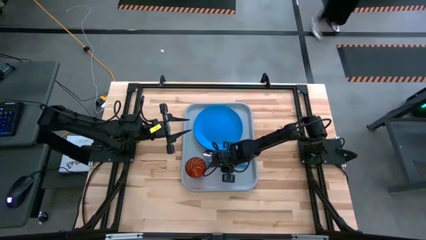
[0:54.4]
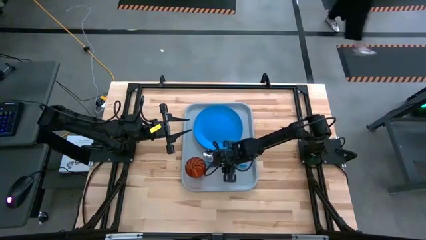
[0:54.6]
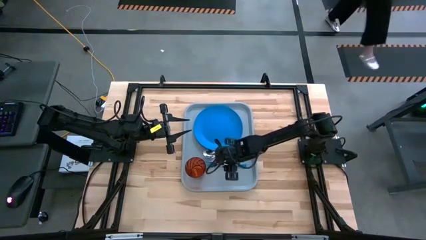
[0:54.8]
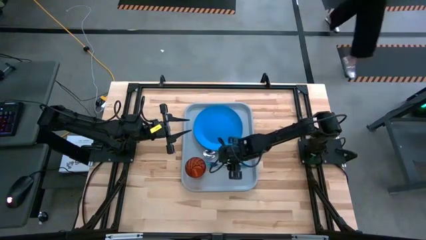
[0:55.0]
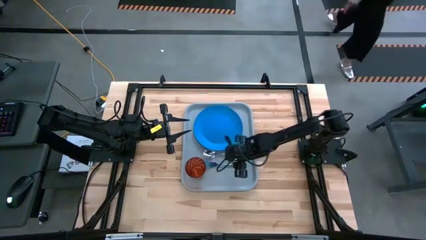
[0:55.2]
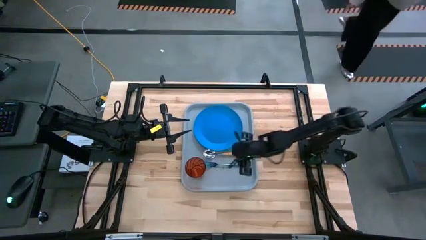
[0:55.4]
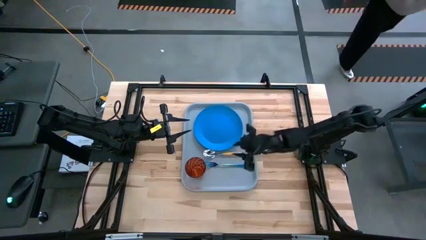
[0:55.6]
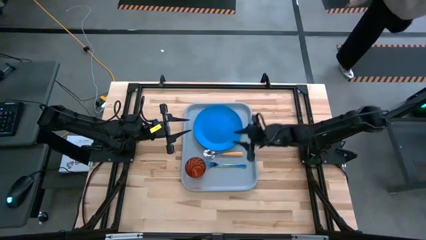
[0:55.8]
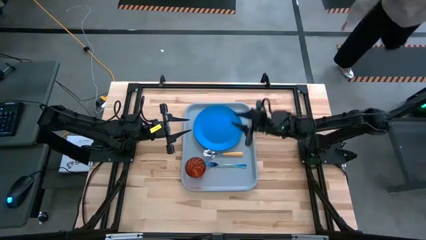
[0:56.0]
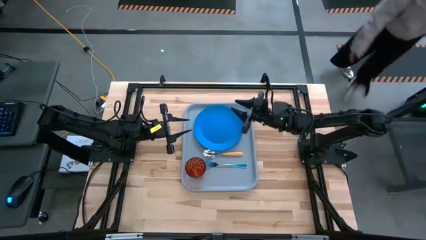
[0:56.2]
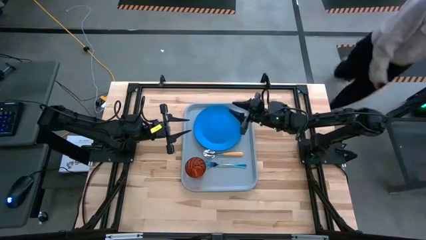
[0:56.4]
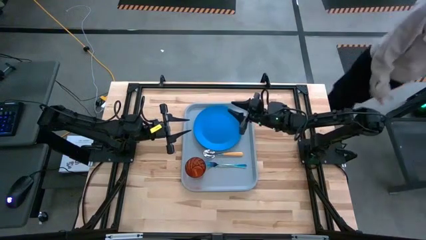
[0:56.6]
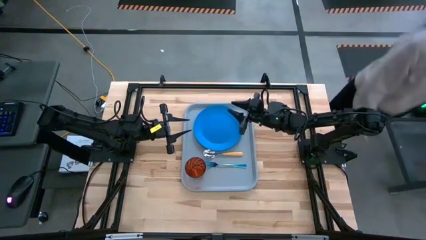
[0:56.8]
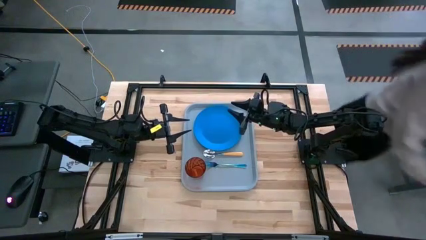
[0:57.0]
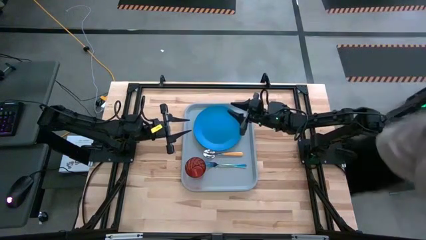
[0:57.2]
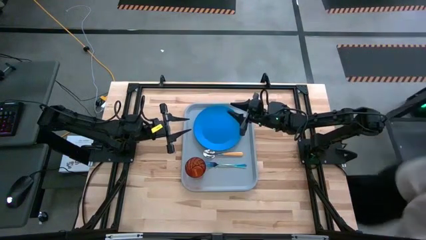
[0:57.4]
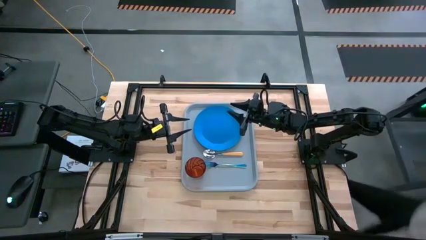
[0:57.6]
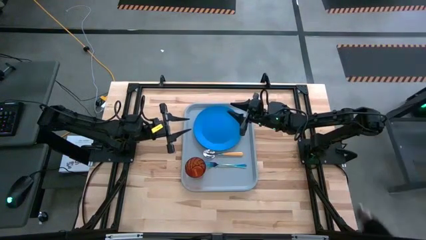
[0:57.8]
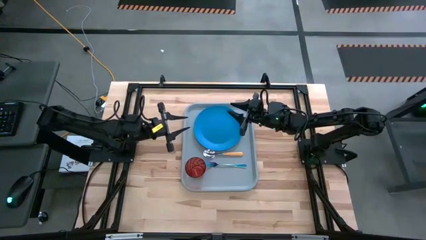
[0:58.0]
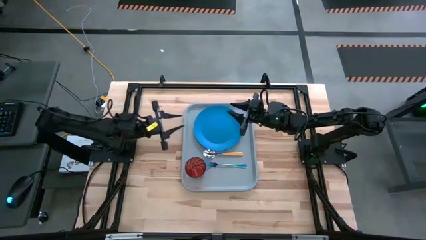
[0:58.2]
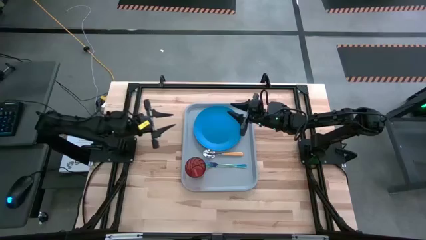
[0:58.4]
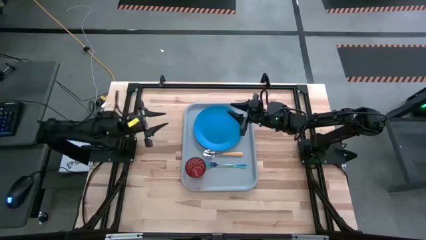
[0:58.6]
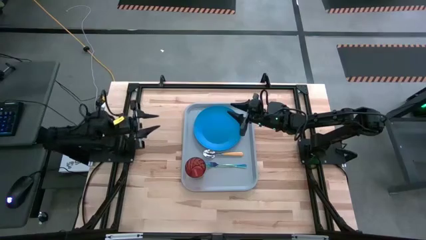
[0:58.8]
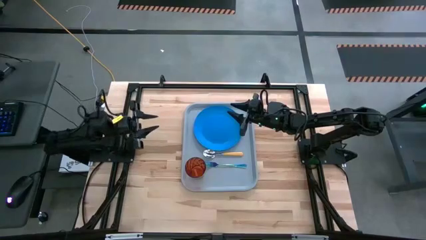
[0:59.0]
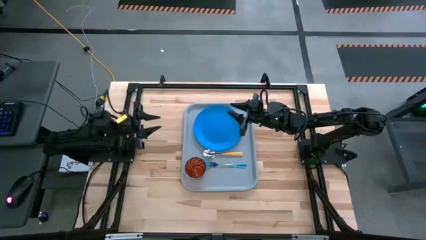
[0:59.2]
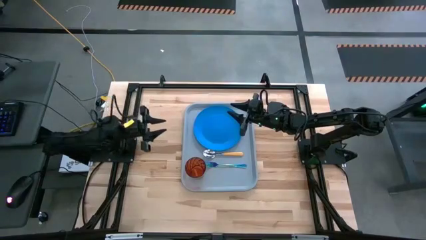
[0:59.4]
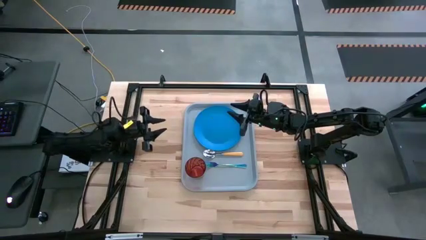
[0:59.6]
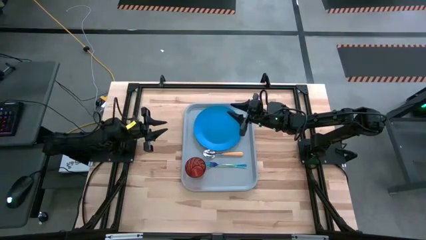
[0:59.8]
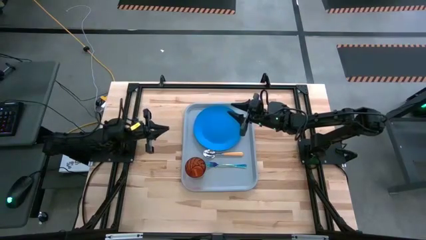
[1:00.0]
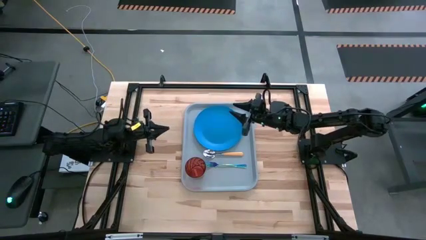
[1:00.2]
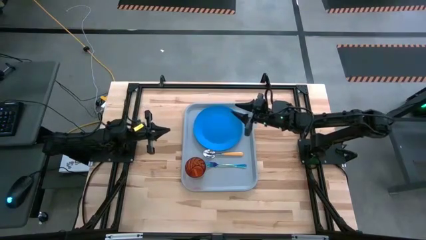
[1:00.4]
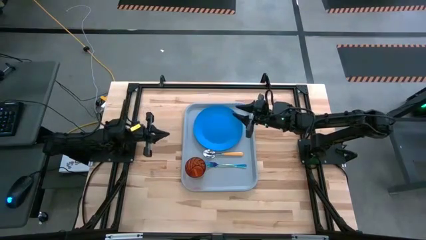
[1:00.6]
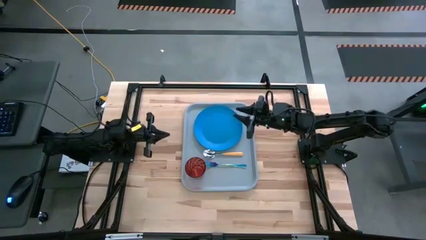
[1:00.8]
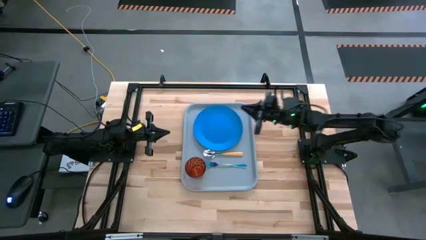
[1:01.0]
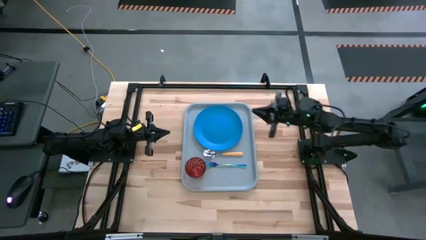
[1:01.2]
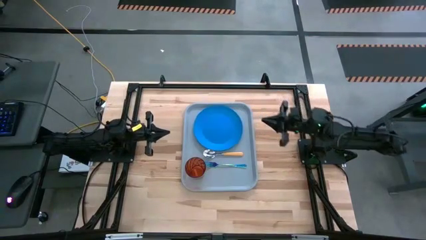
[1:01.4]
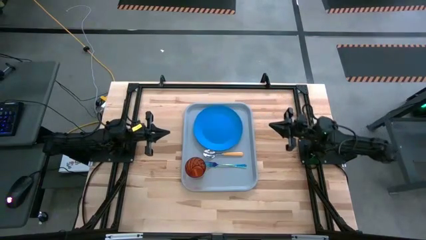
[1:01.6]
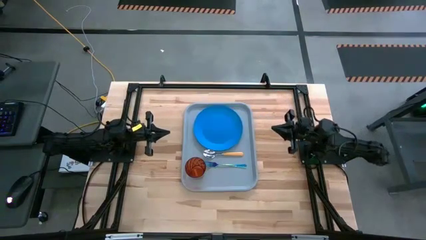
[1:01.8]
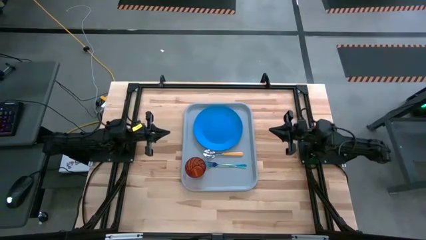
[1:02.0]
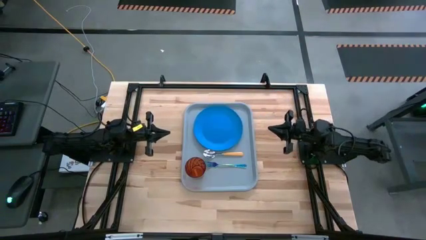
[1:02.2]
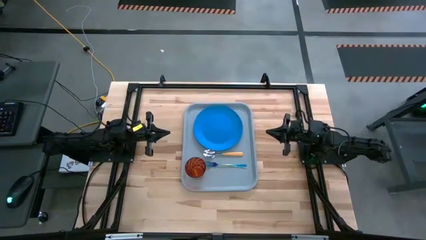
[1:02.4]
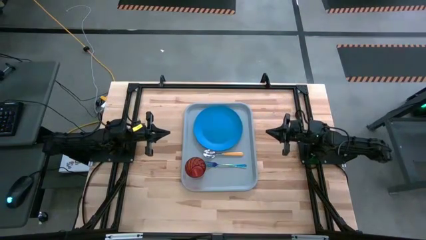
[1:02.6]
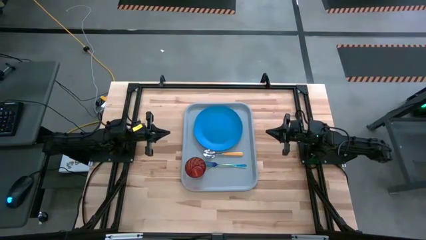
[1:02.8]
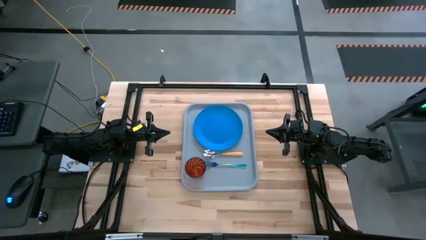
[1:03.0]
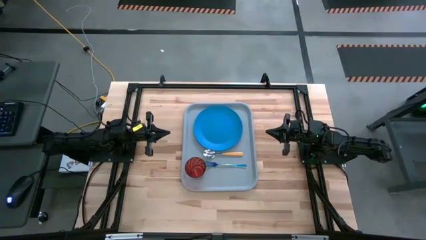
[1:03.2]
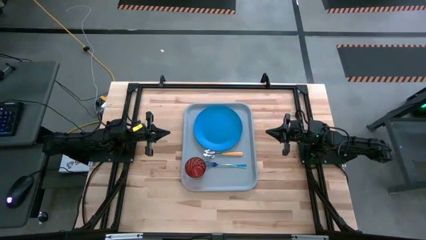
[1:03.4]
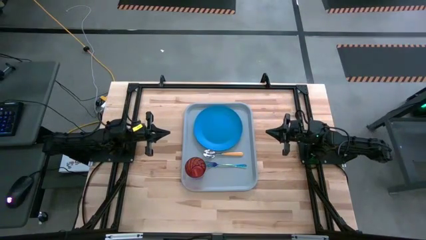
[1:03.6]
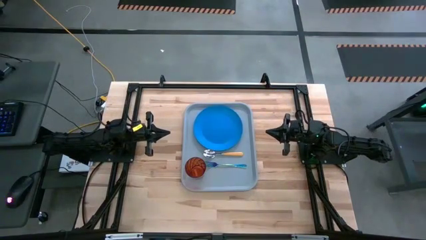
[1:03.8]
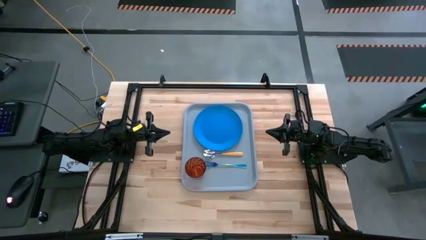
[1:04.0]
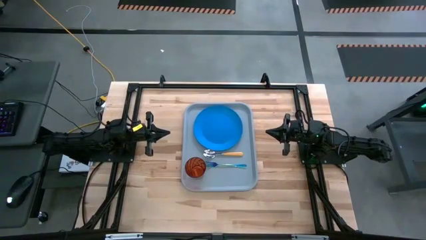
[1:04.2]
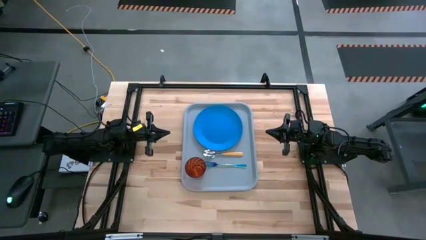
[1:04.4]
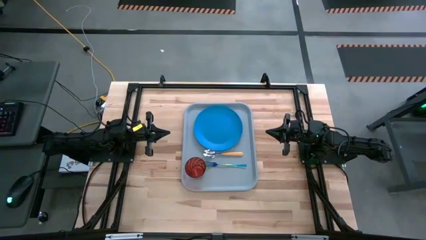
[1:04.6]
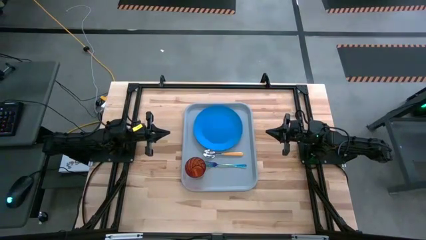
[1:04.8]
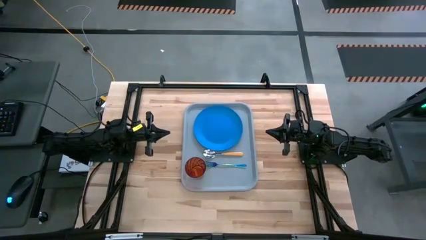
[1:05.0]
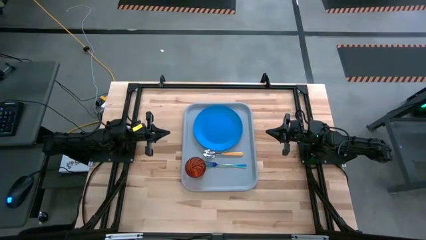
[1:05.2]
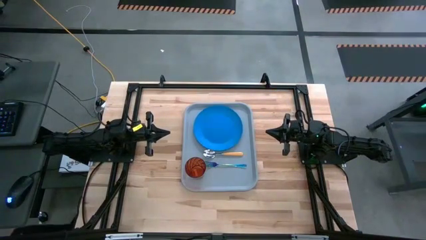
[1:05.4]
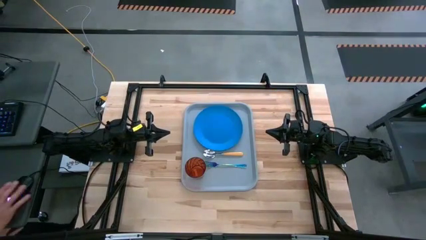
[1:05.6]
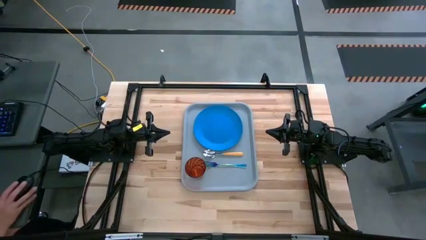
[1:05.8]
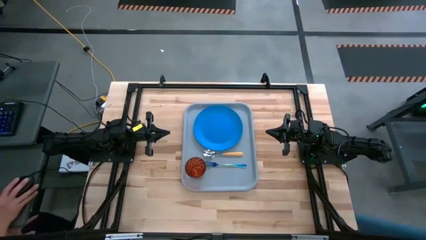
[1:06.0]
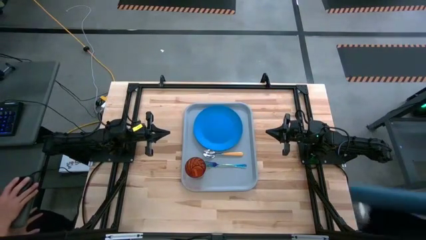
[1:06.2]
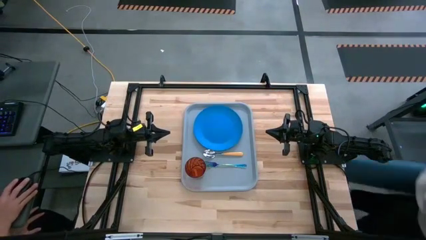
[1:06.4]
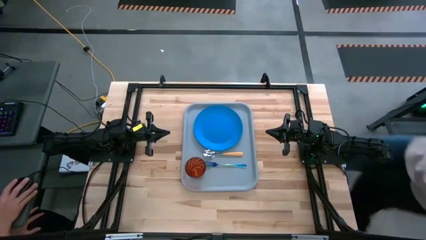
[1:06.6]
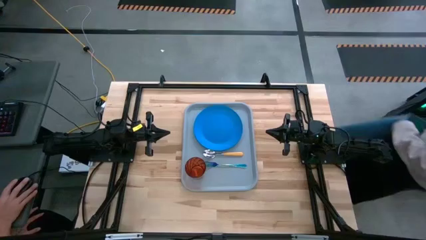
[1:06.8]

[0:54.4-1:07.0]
Task: Pick and place plate/cup/fork/spoon on tray
Return to Home Position

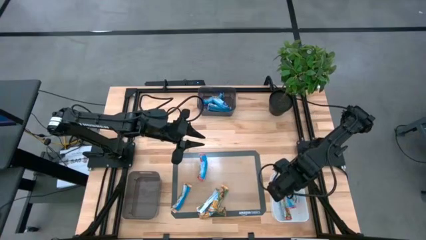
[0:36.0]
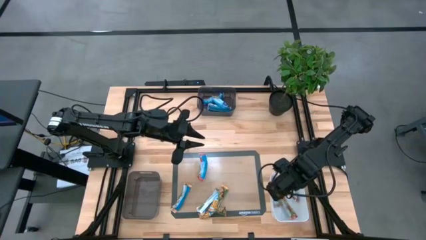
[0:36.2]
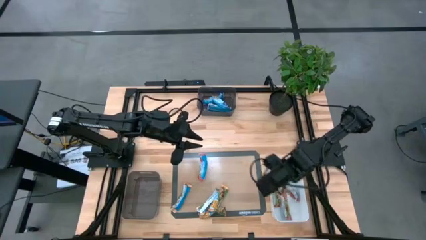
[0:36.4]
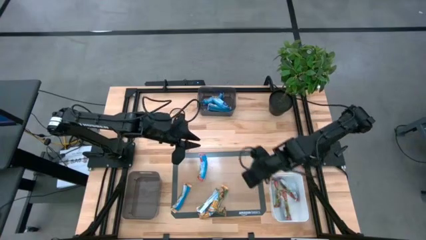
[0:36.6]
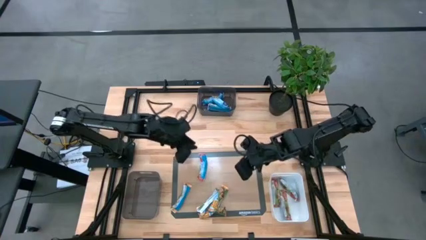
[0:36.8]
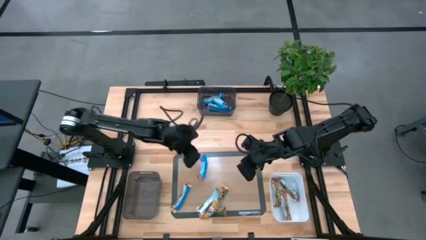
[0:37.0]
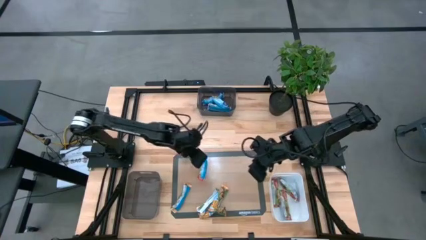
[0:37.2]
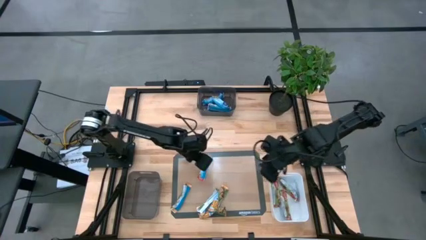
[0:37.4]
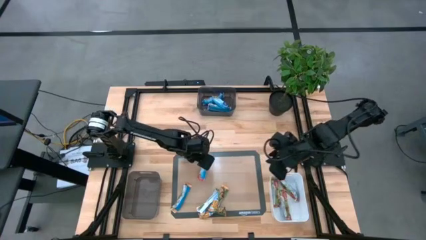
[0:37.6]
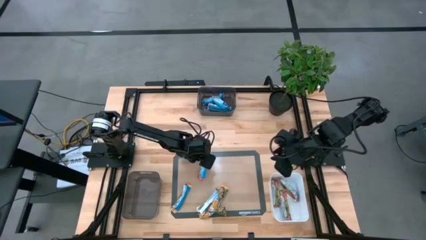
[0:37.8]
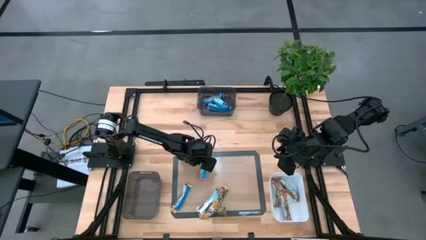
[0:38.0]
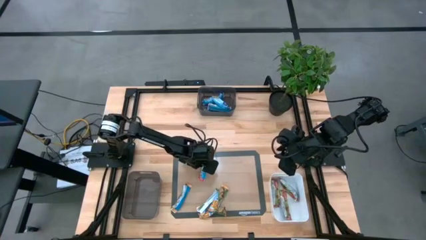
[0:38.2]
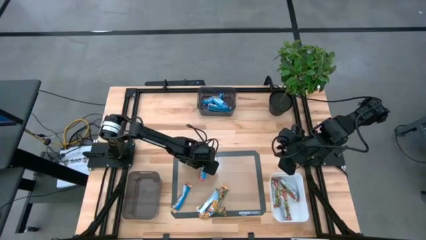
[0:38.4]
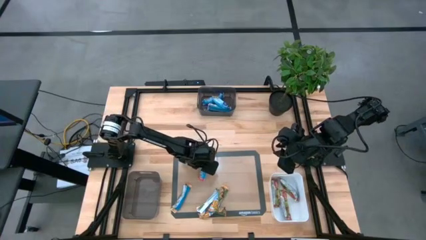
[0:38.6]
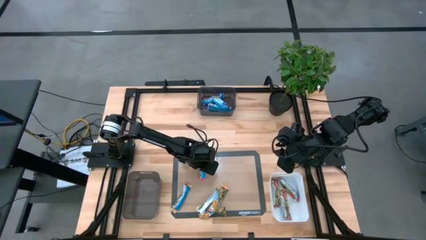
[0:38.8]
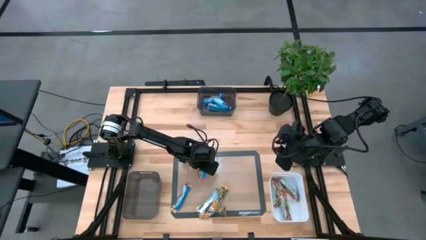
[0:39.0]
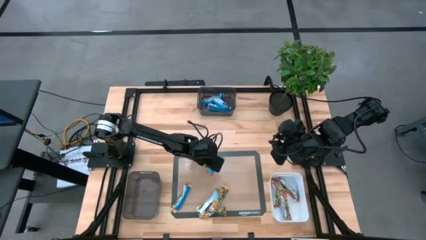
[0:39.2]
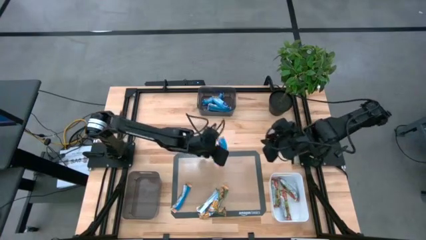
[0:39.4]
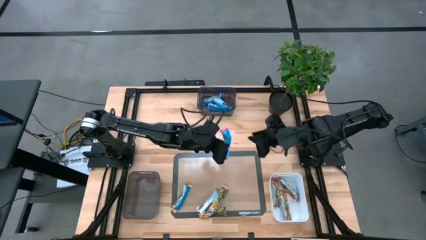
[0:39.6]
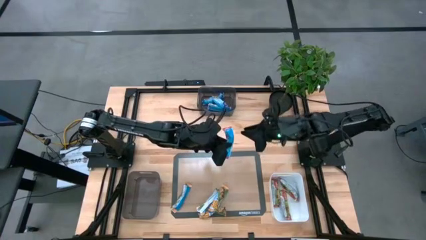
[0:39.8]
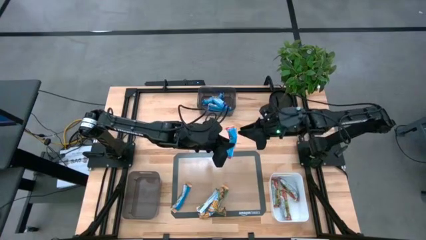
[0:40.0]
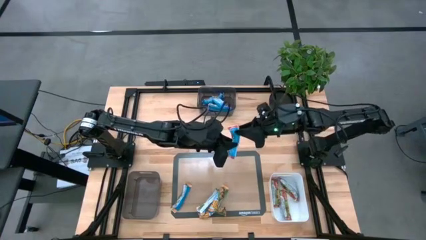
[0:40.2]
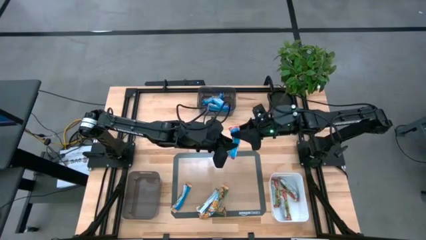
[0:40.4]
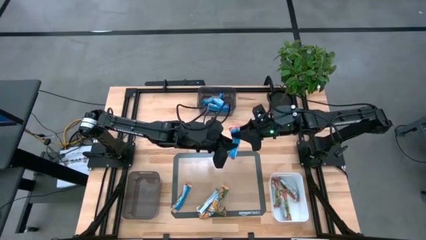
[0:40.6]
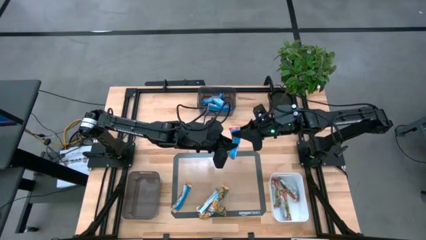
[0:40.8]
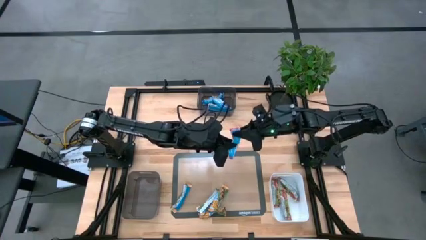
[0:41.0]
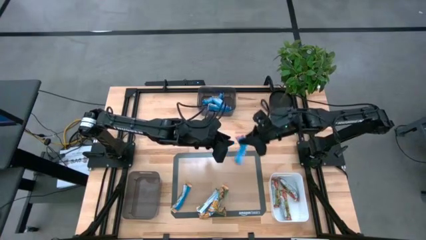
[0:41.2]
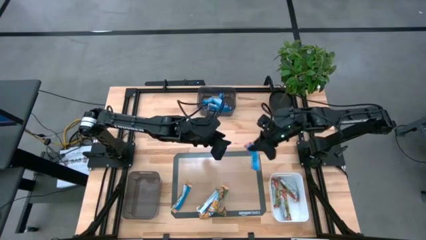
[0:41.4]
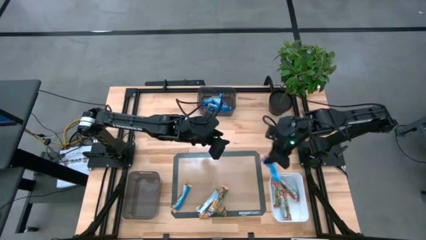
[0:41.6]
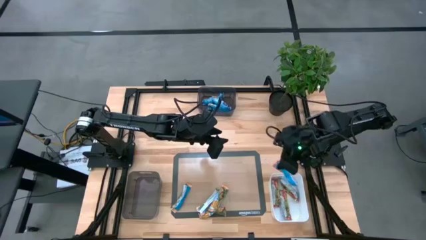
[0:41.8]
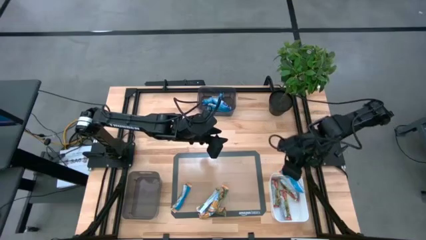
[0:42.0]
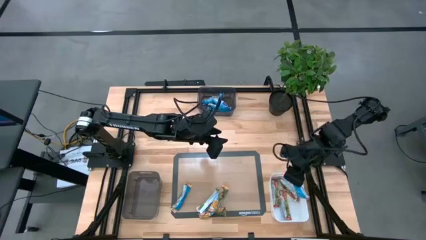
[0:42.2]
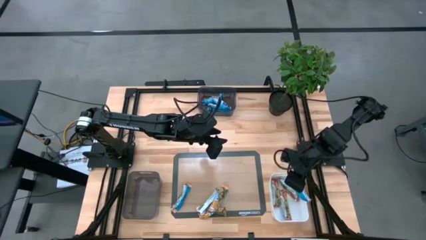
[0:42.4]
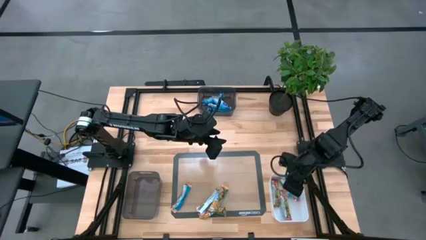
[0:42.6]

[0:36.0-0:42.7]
Task: Pick and place Granola Bars by type
Put the red granola bar into the white bin
